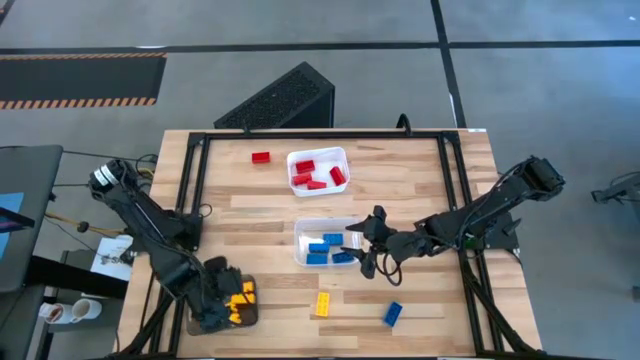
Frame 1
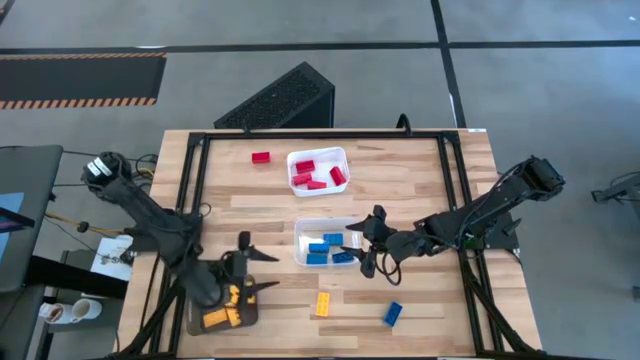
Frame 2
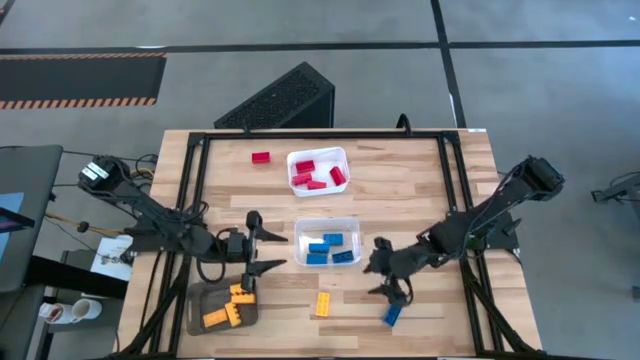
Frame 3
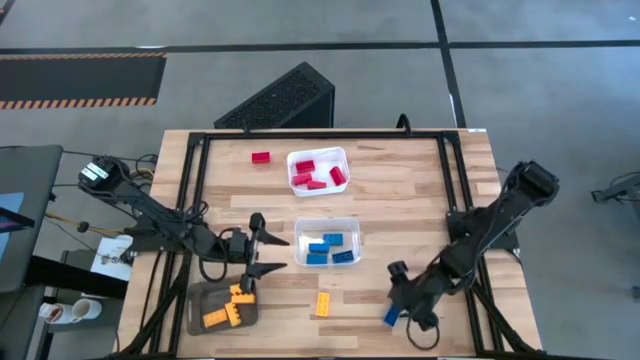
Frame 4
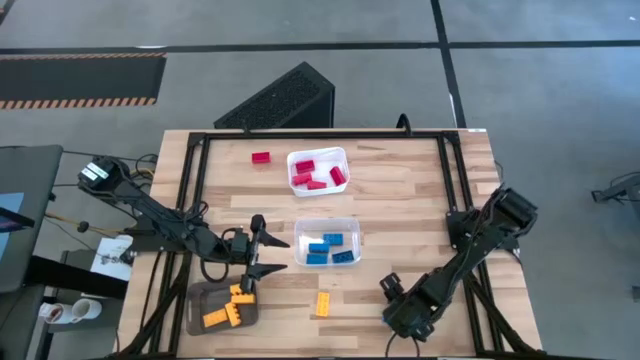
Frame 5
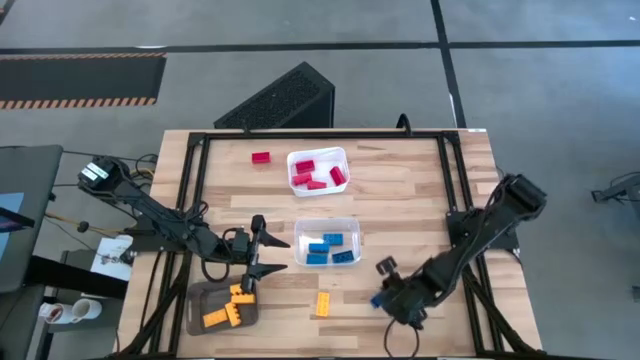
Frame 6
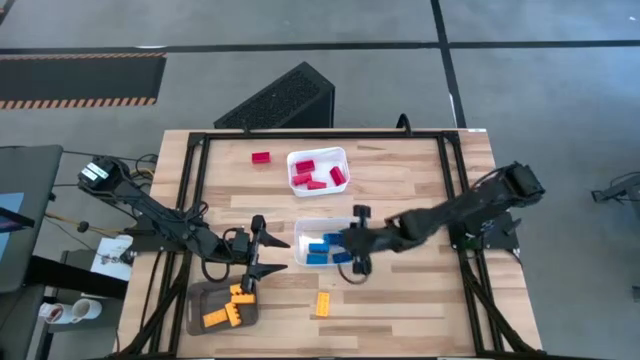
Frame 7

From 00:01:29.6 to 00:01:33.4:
Task: Sort & place blocks by color
Put the blue game piece into the transparent bin

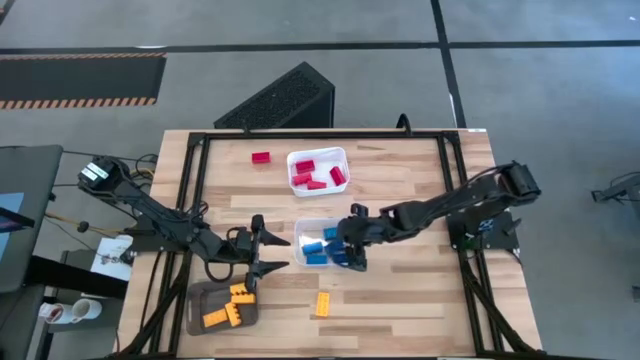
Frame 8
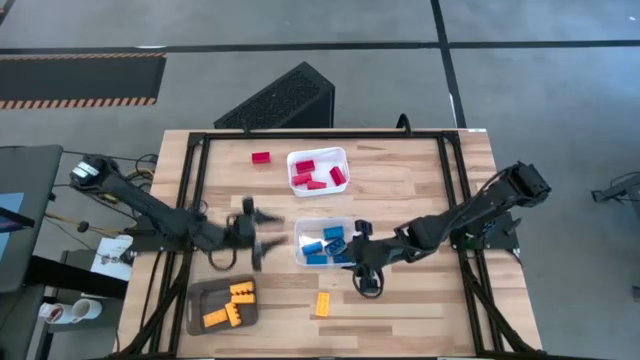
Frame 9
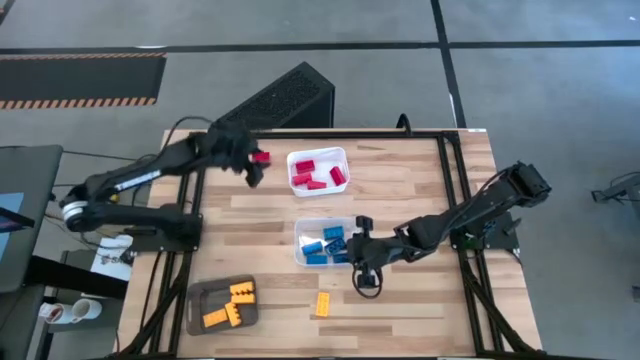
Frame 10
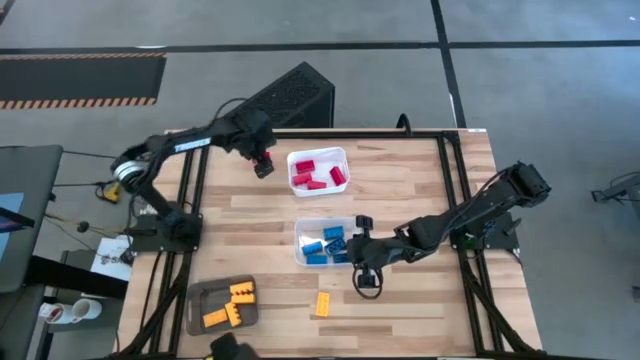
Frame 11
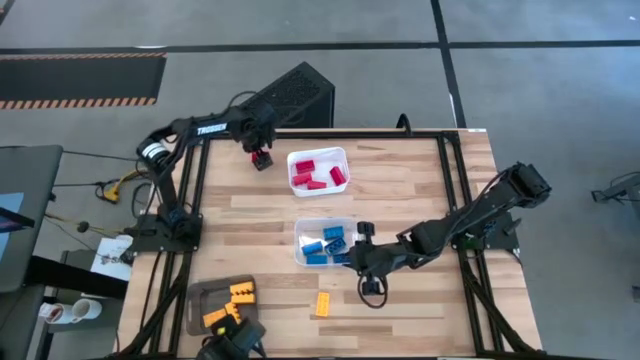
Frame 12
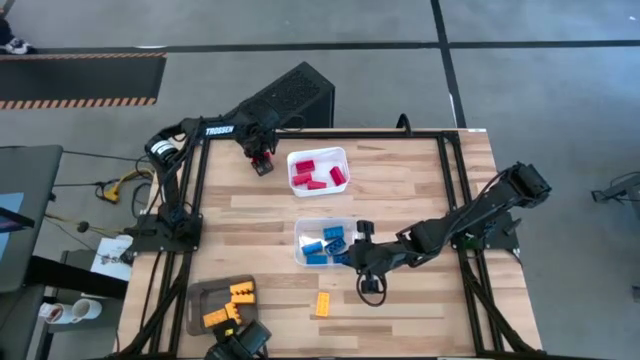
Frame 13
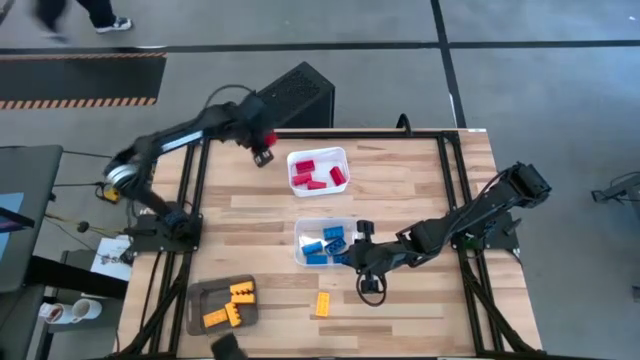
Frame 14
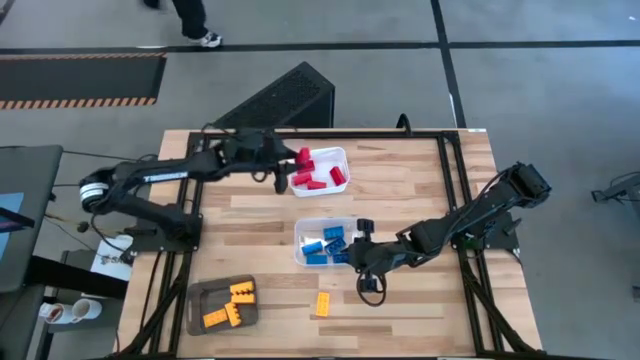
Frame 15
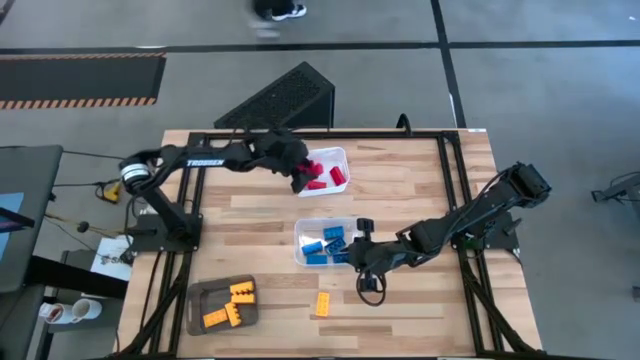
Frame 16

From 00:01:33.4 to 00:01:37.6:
Put the red game piece into the white bin

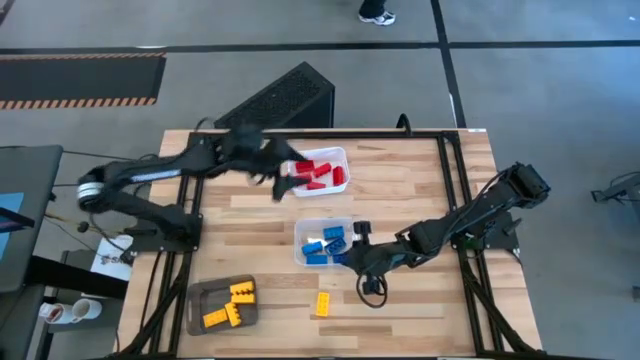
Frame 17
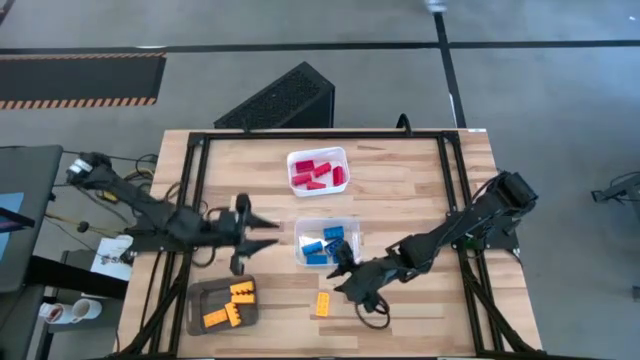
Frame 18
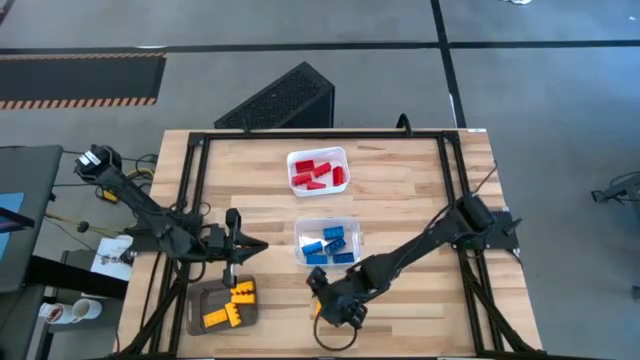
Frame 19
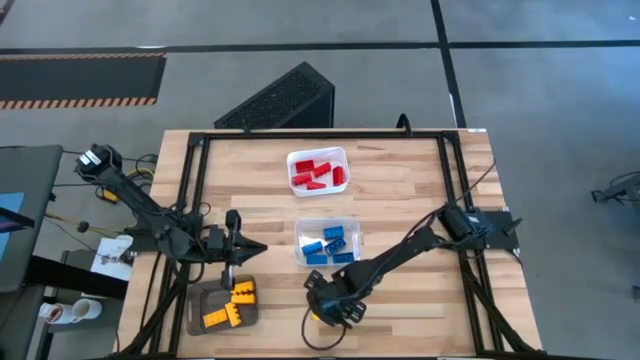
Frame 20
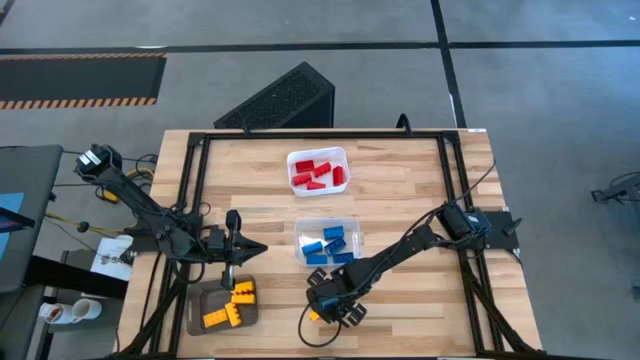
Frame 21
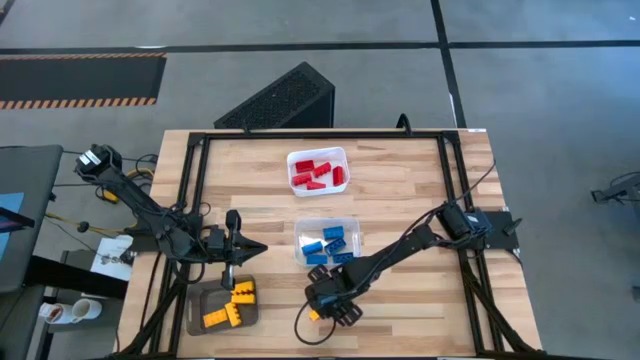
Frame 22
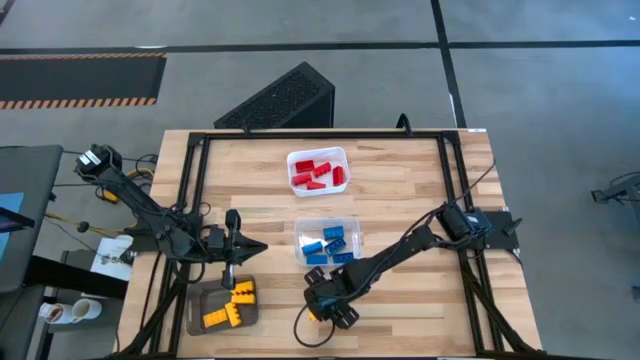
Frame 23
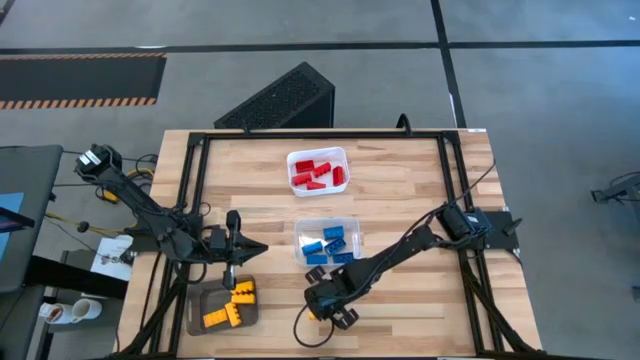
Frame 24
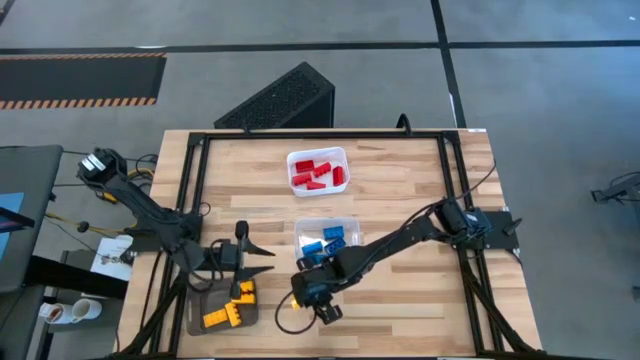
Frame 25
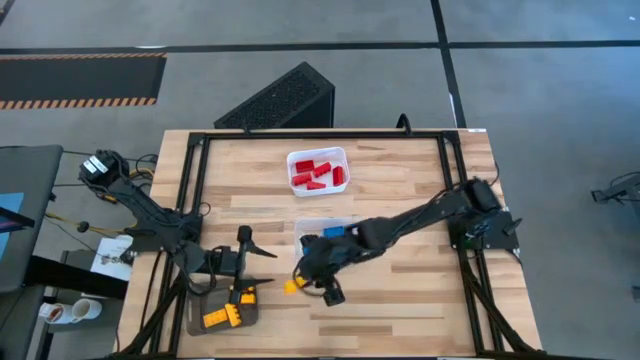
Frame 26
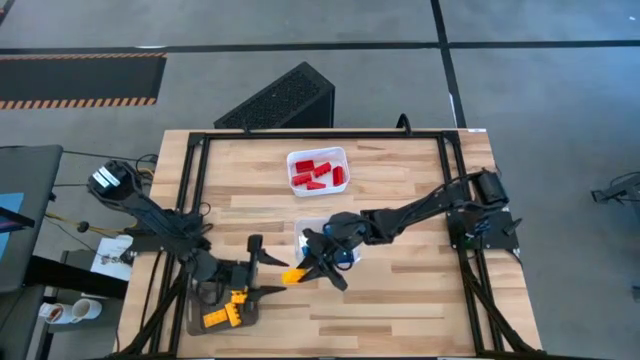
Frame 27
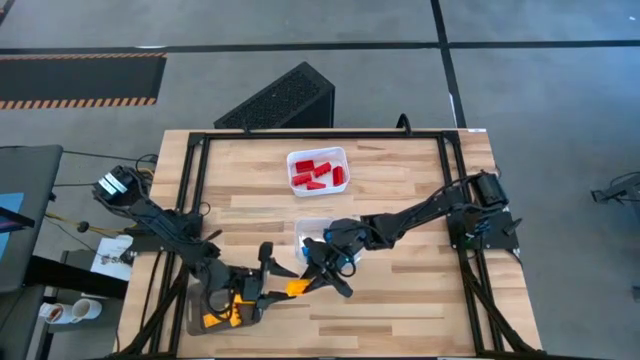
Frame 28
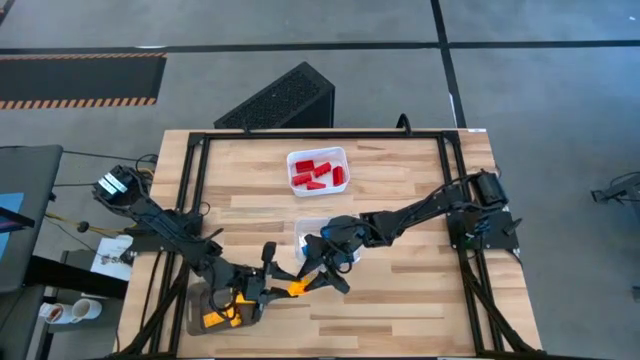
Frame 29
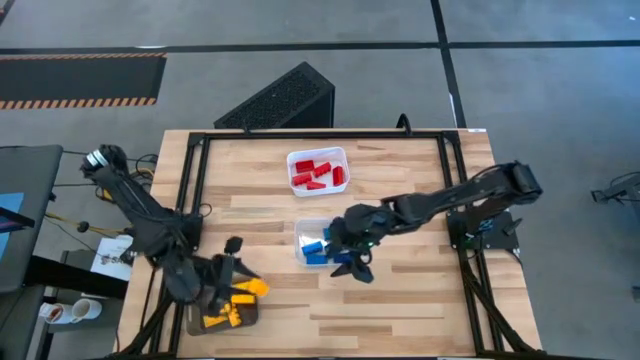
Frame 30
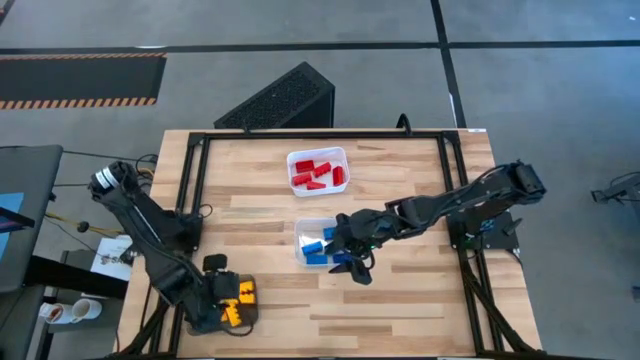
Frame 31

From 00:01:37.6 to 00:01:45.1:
Put the yellow game piece into the black bin

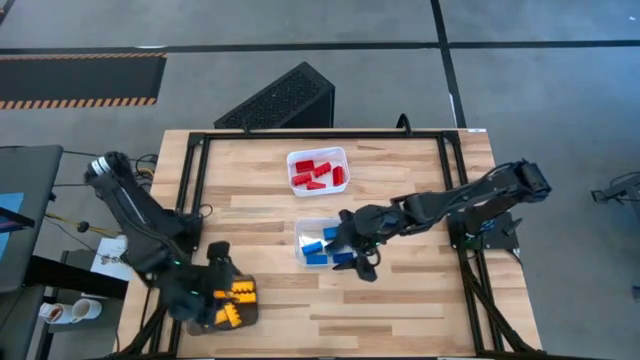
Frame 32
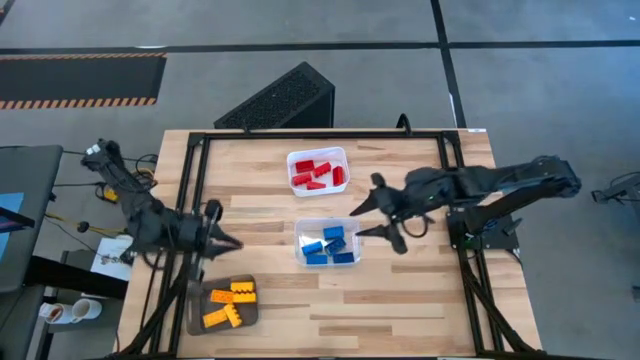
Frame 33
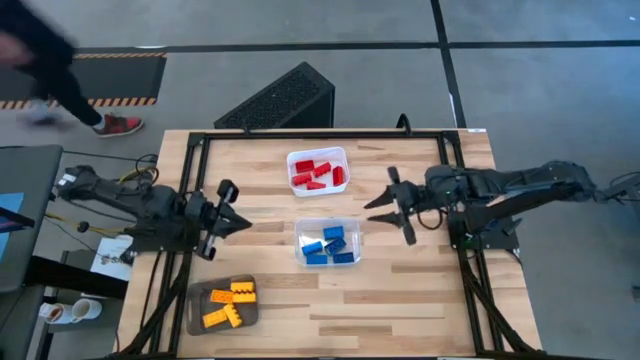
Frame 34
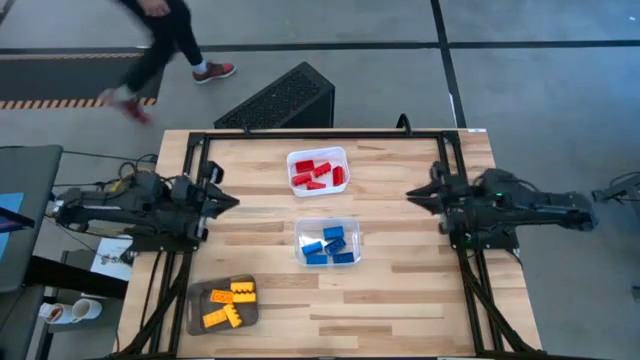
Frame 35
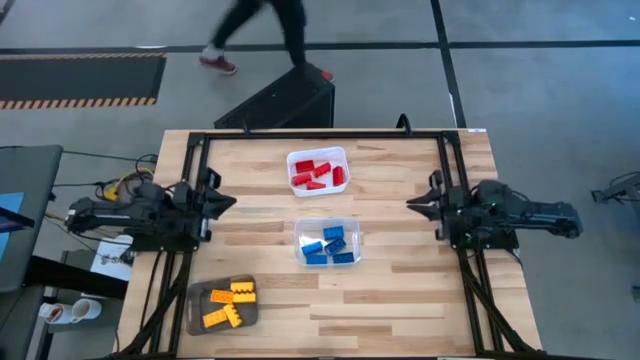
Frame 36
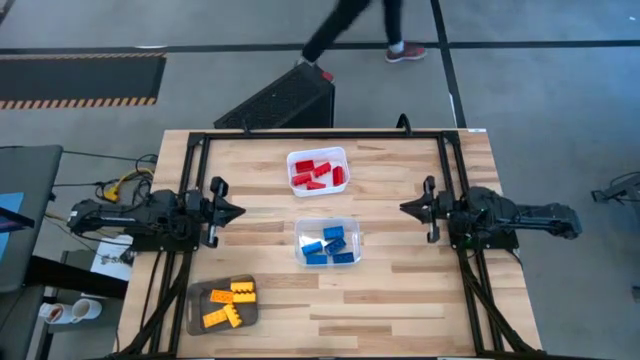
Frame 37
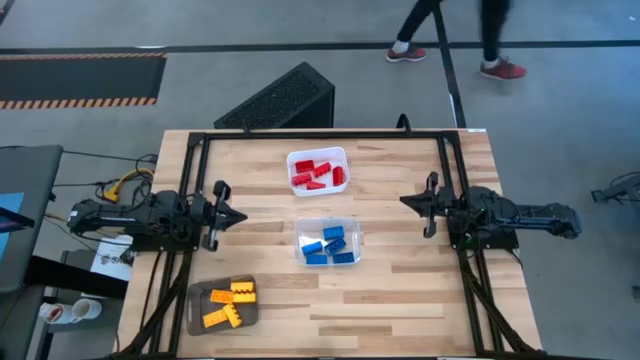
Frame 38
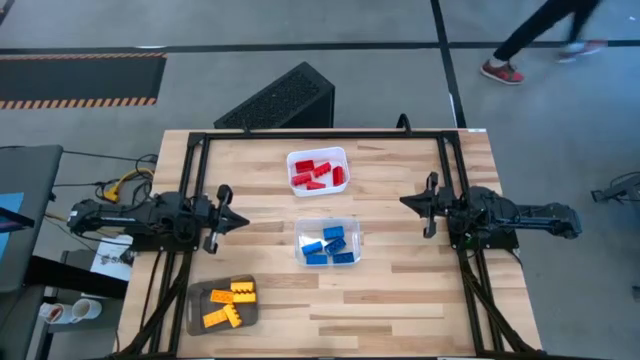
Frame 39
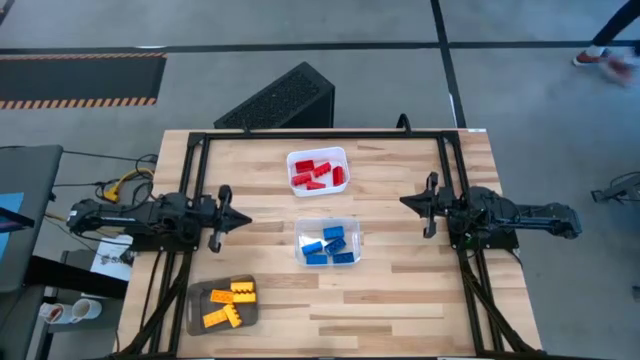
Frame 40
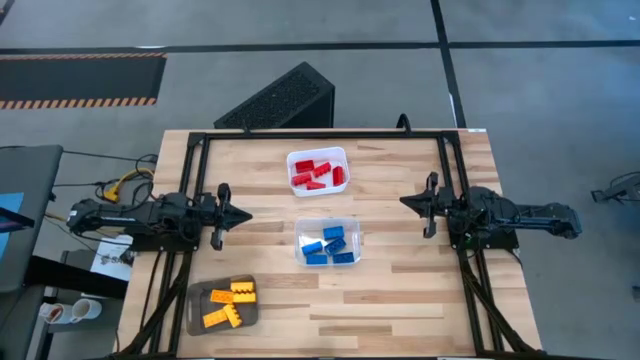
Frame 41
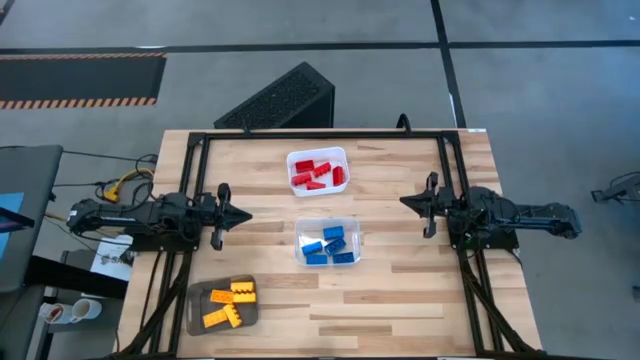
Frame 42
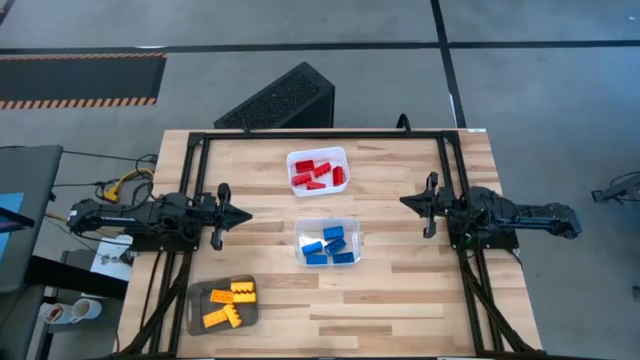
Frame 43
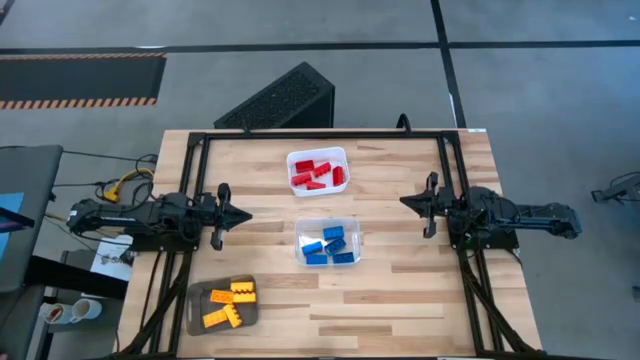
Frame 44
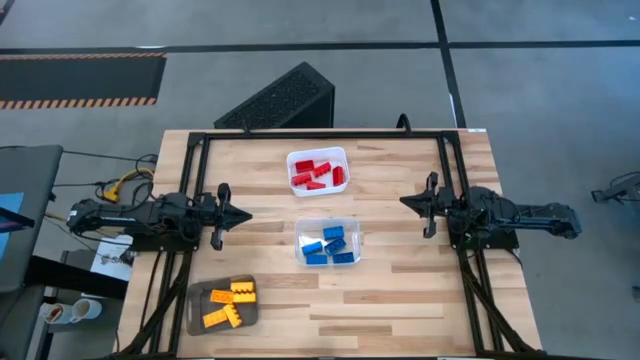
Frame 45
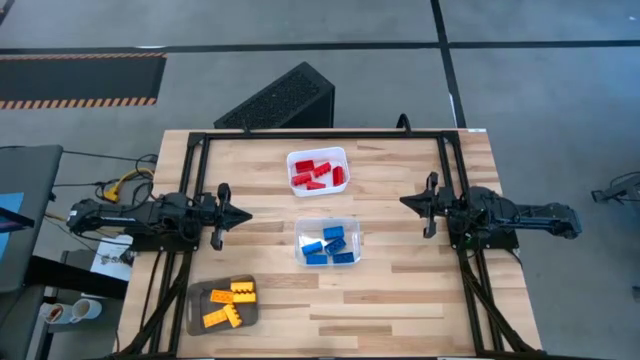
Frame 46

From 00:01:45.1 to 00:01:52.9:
Return to Home Position
